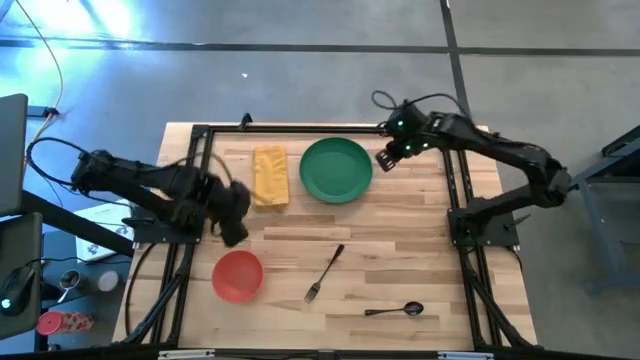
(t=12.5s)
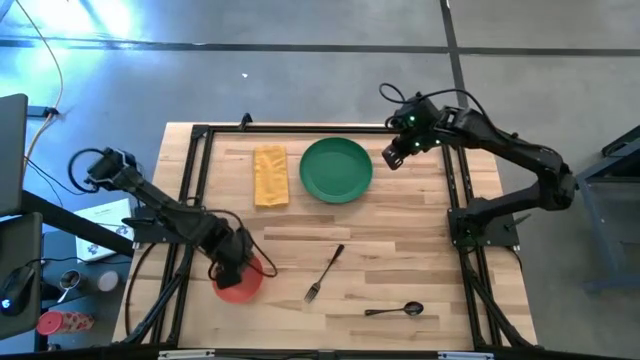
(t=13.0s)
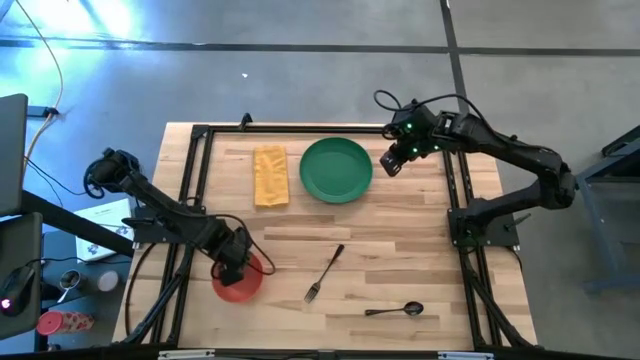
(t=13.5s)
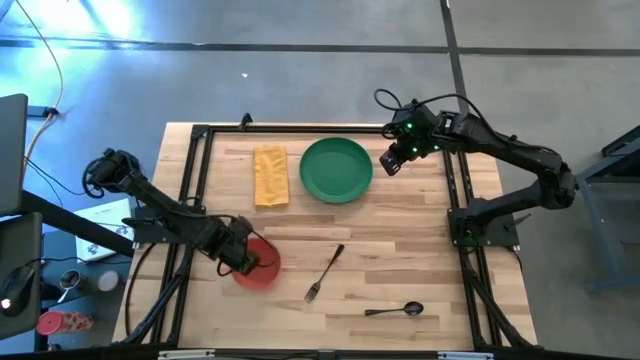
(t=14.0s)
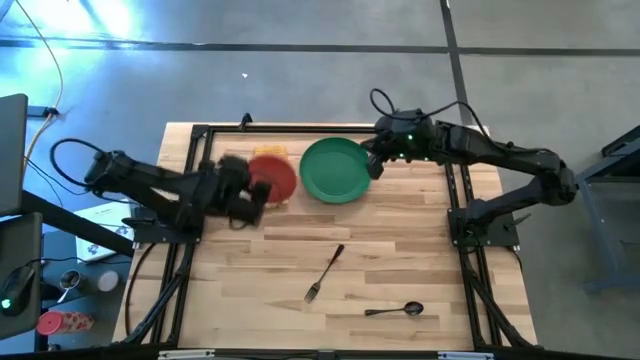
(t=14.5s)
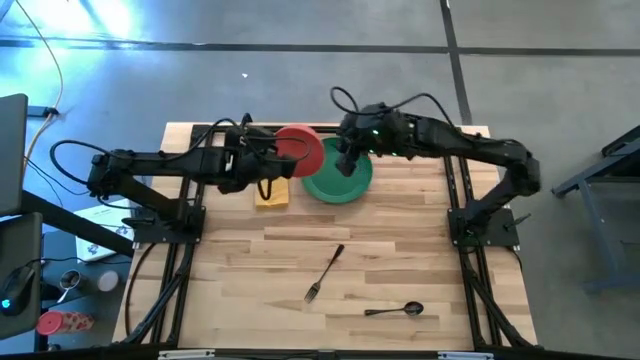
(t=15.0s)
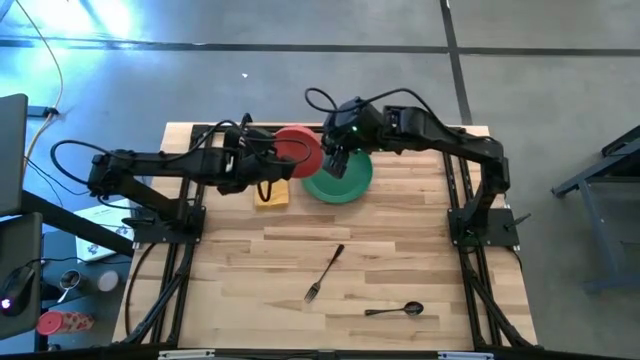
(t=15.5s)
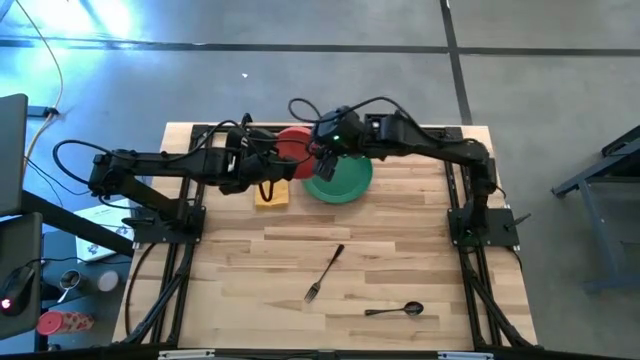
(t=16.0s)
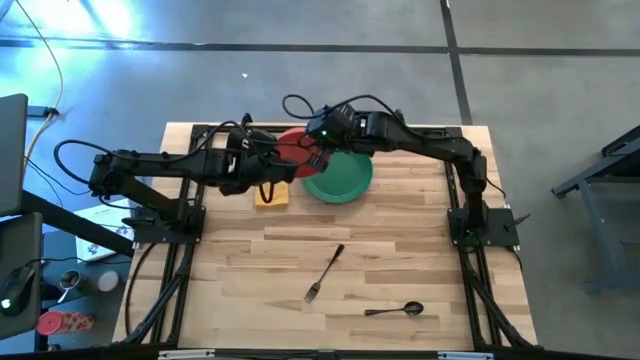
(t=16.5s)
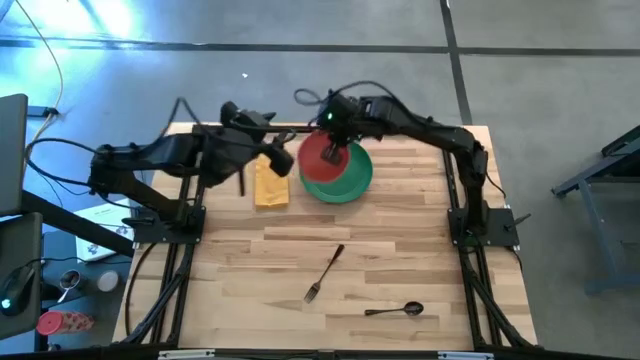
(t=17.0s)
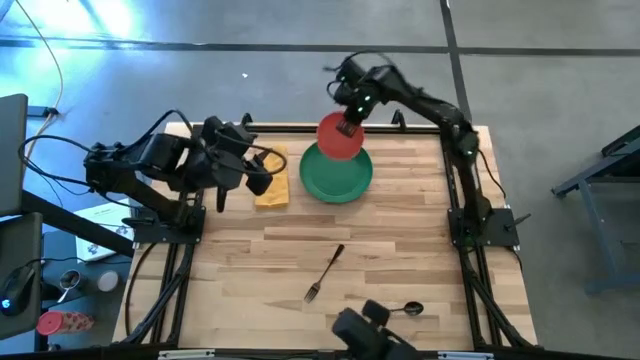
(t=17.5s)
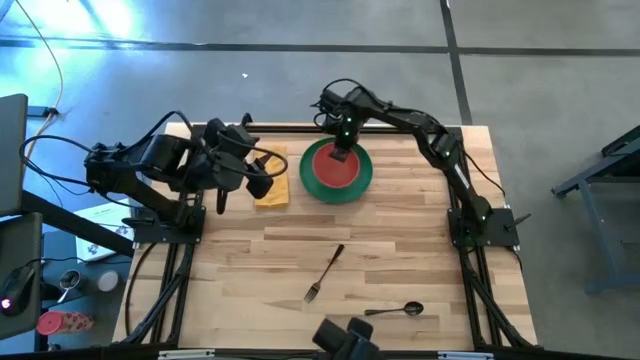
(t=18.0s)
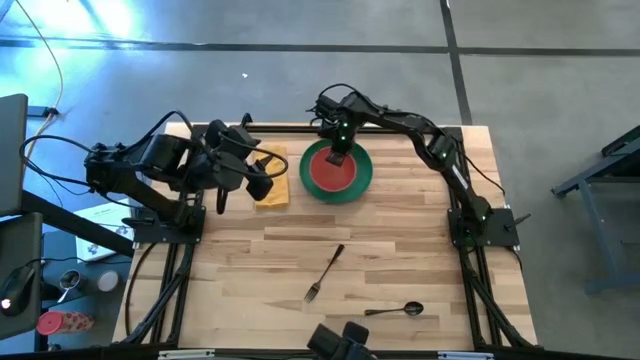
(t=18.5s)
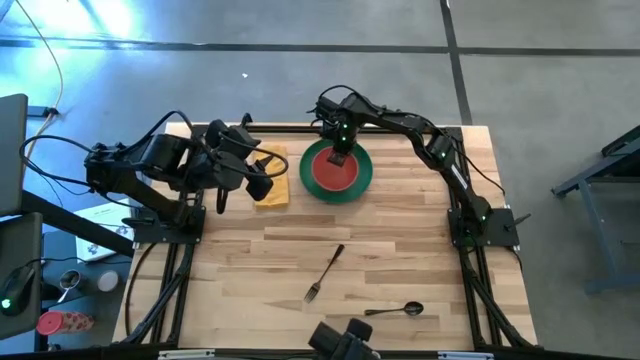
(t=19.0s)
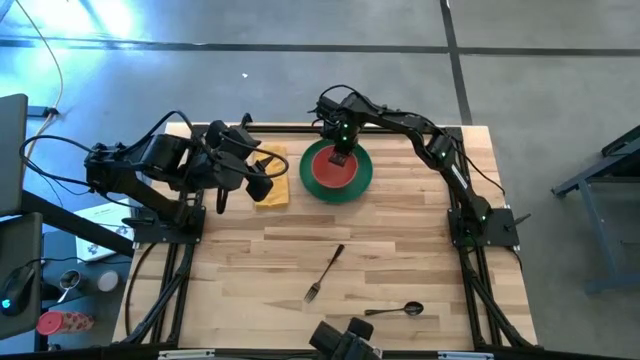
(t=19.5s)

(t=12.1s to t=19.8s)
Task: Set table place
Put the orange bowl on the green plate

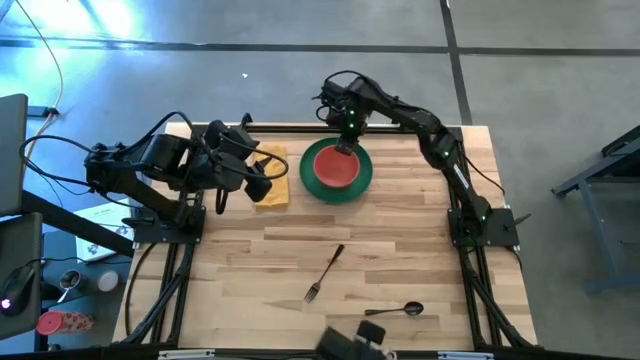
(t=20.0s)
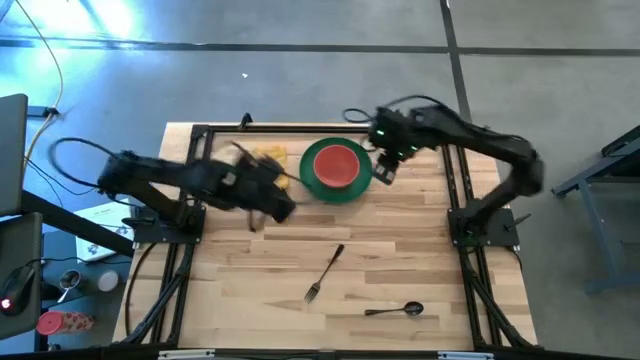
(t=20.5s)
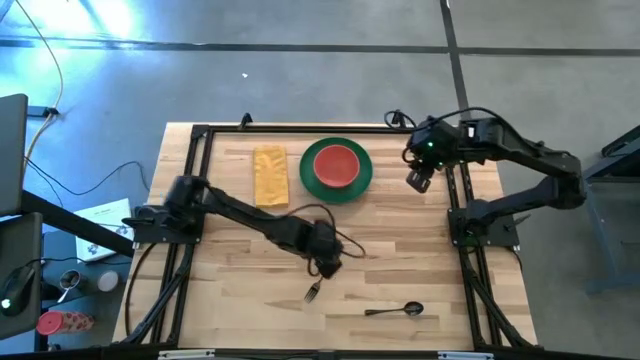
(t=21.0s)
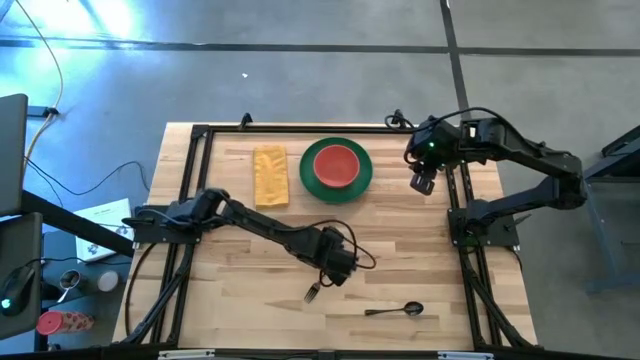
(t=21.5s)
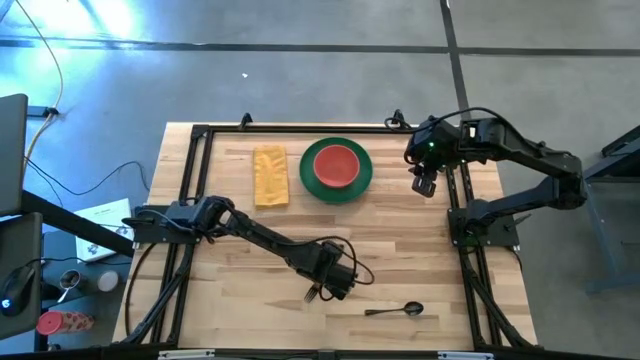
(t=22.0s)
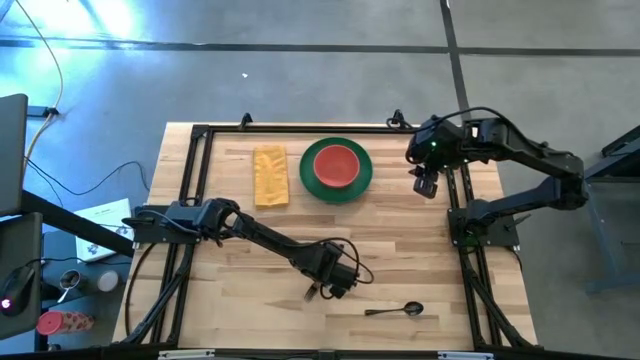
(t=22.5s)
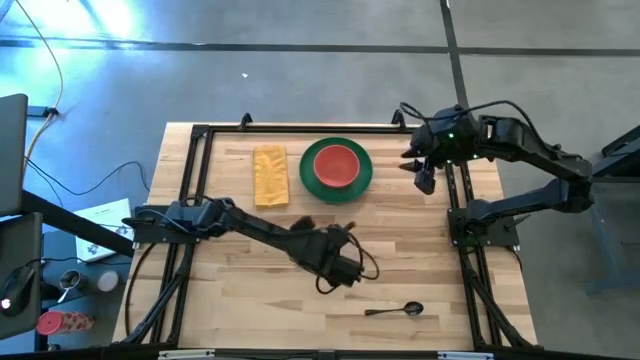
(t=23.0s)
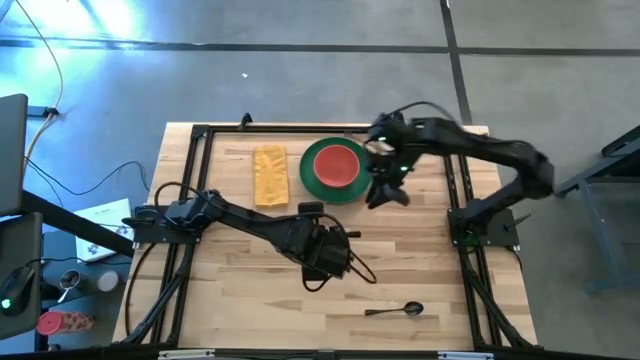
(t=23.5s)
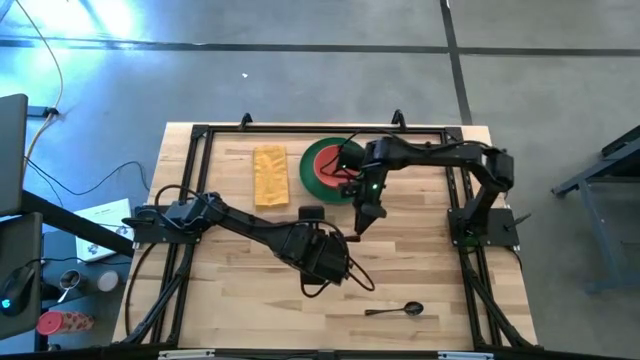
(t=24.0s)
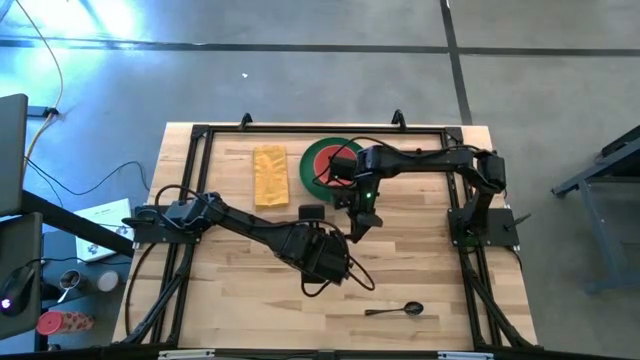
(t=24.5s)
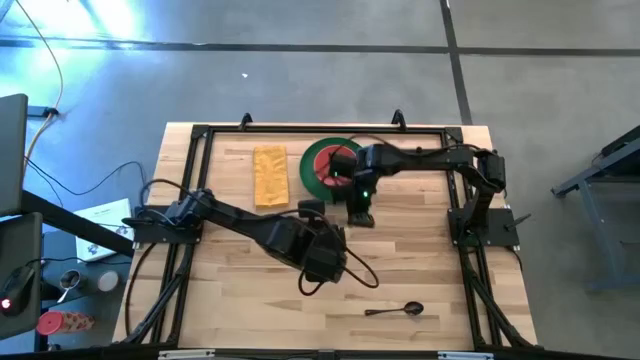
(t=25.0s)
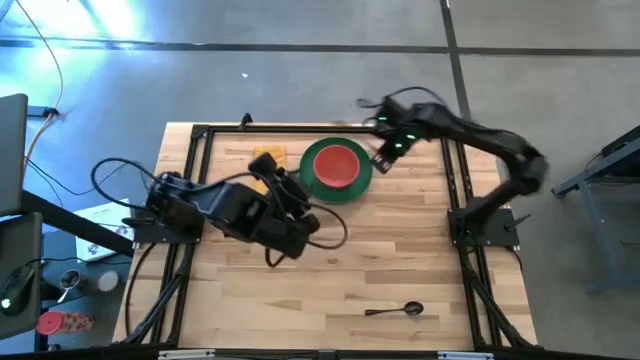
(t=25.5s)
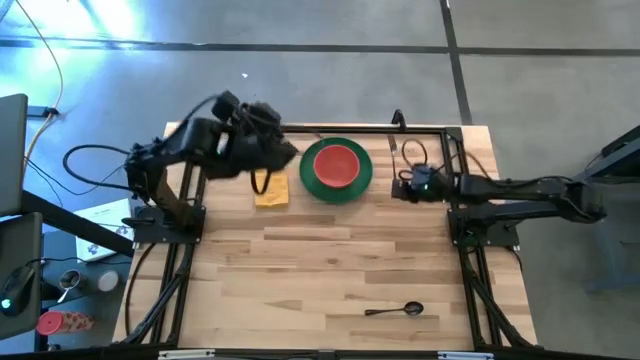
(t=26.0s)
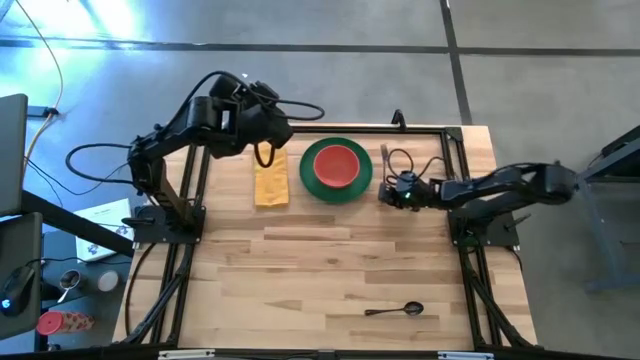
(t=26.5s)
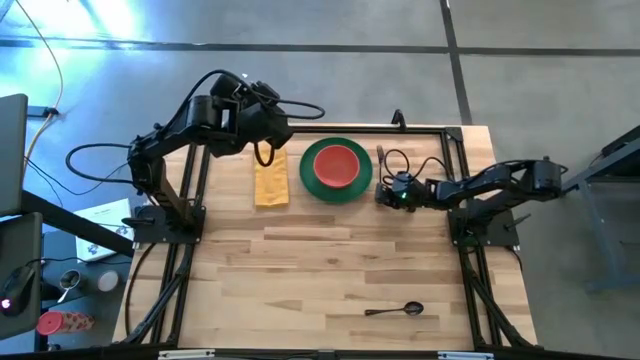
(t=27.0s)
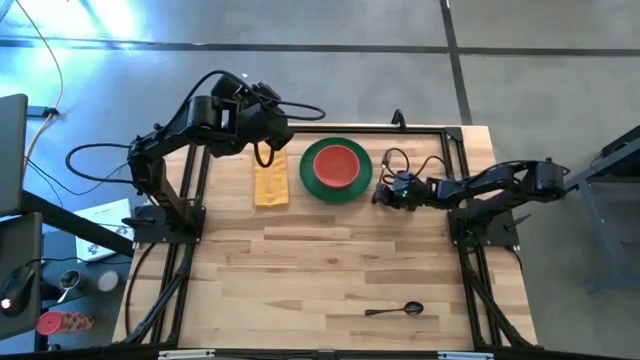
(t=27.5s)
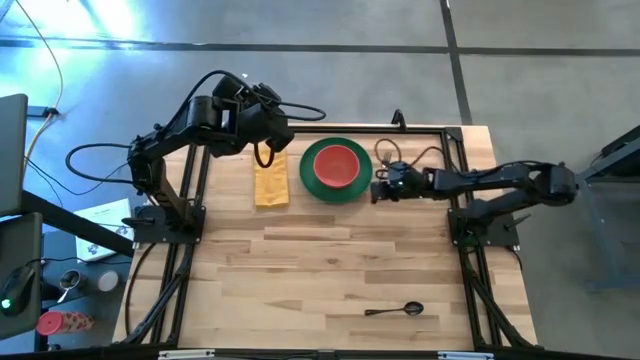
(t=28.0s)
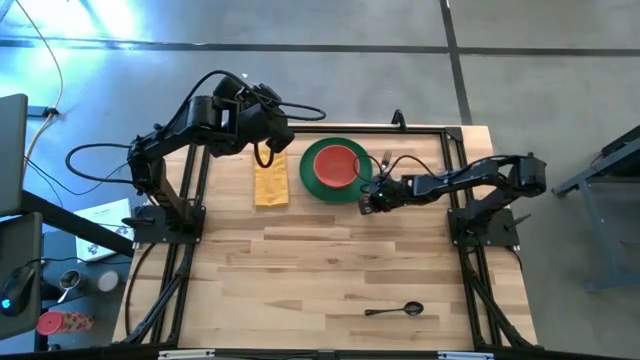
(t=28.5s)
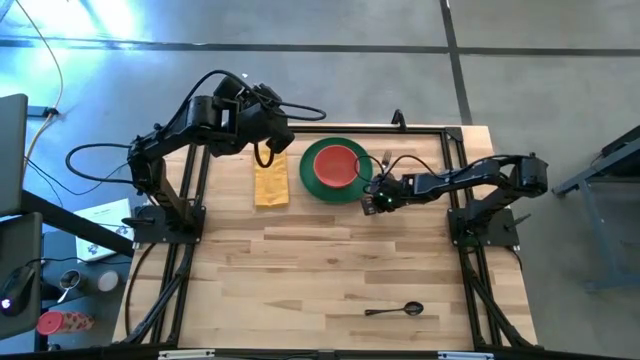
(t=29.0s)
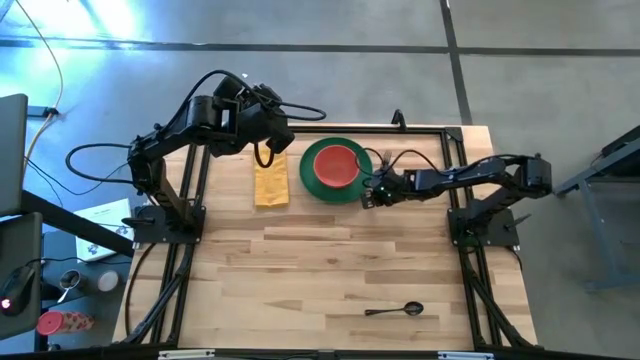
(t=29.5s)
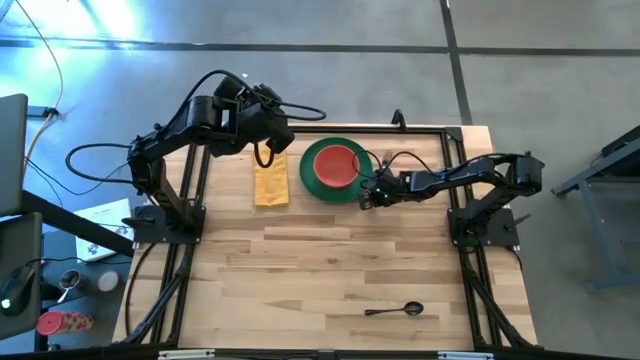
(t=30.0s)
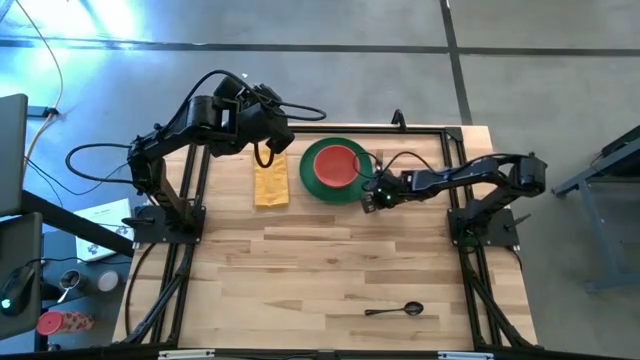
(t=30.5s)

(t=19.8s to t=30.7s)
Put the black fork on the right side of the green plate

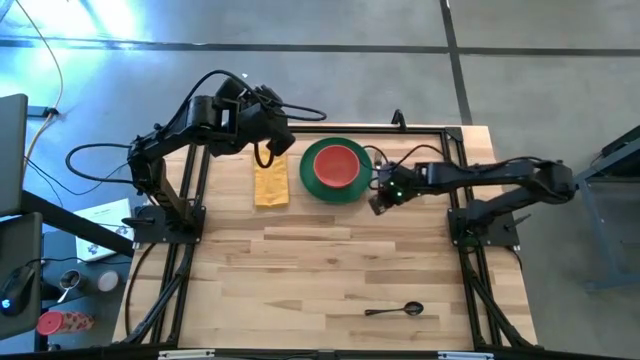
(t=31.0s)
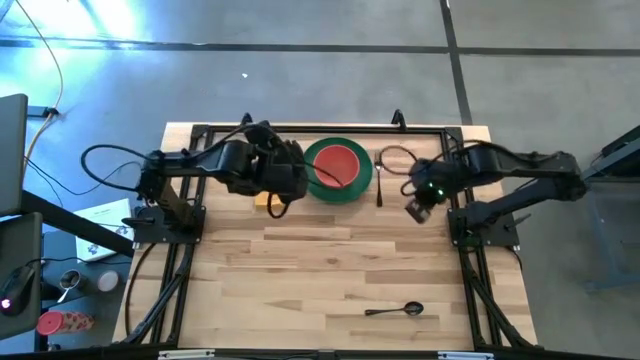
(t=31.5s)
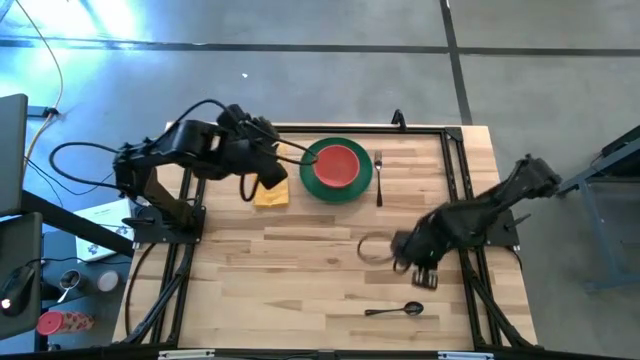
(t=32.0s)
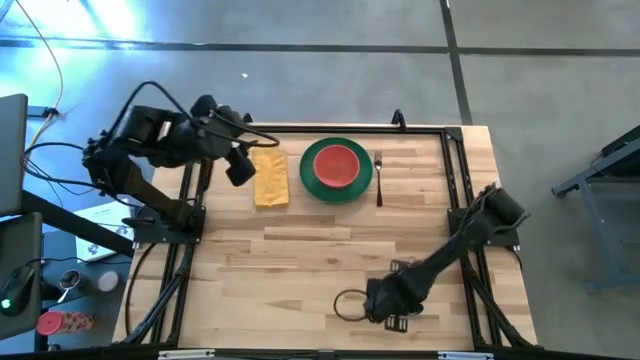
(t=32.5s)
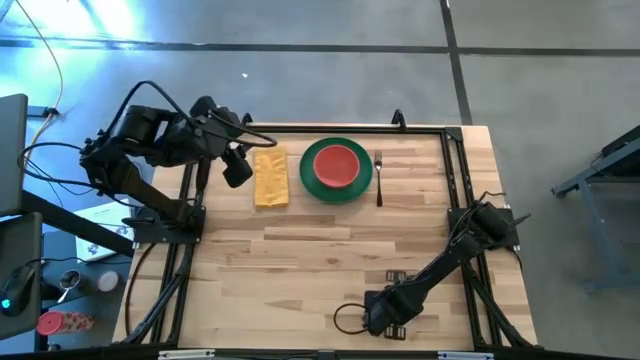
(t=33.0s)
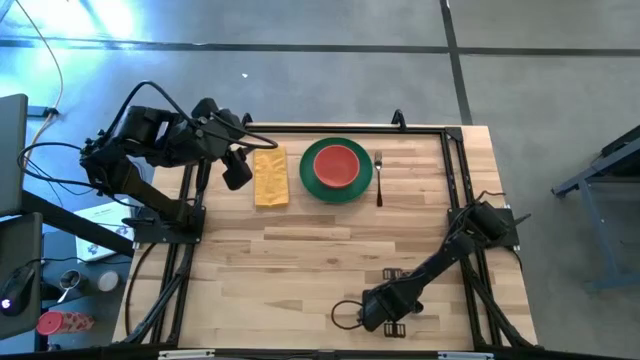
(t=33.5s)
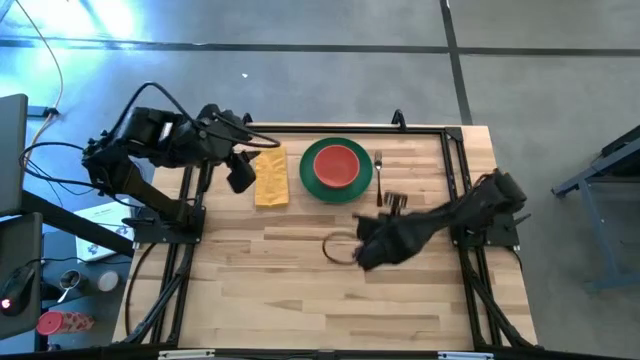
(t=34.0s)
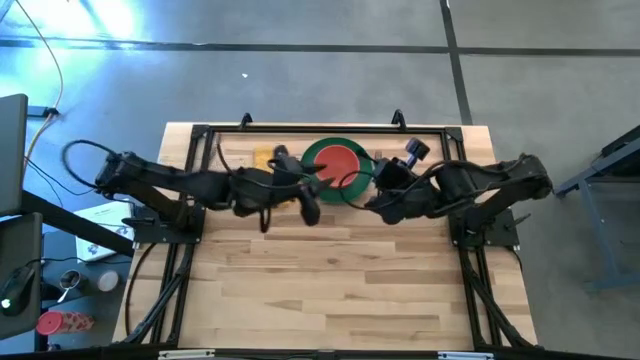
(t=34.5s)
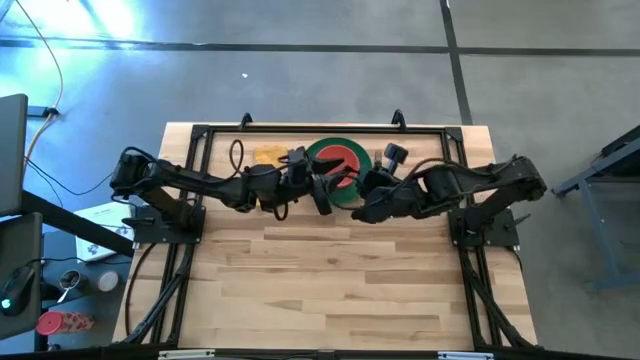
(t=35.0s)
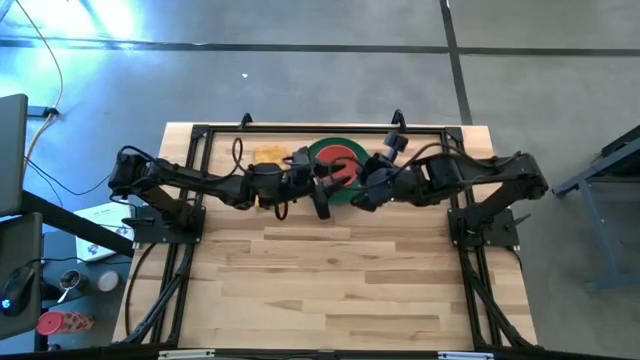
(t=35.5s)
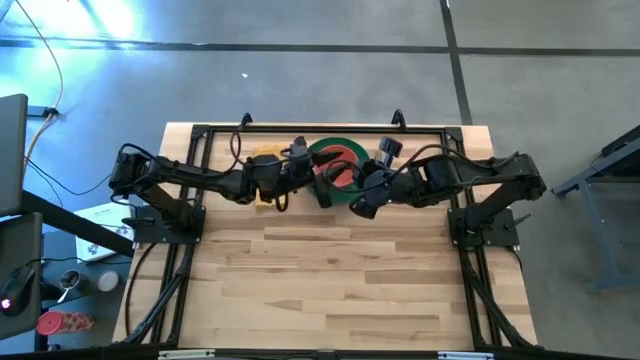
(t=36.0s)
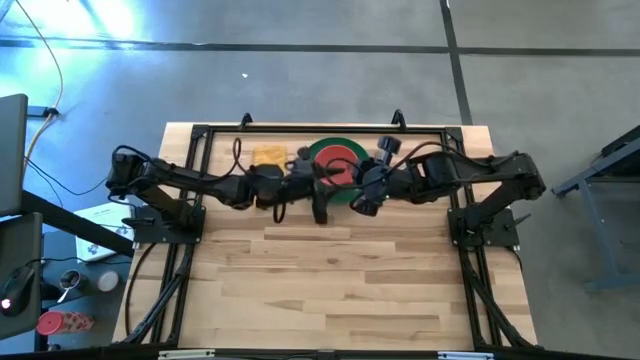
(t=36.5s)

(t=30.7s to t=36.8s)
Put the black spoon into the orange bowl
